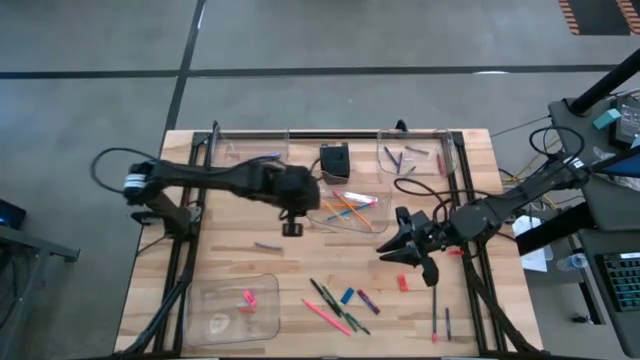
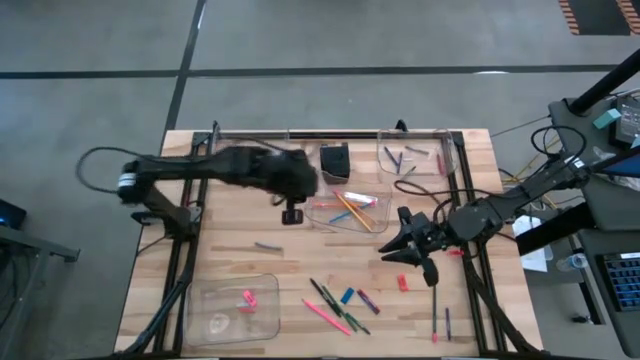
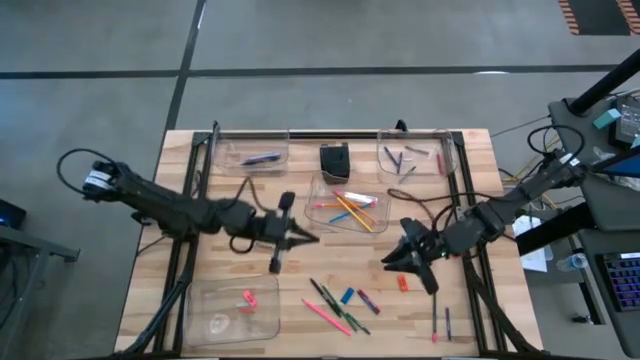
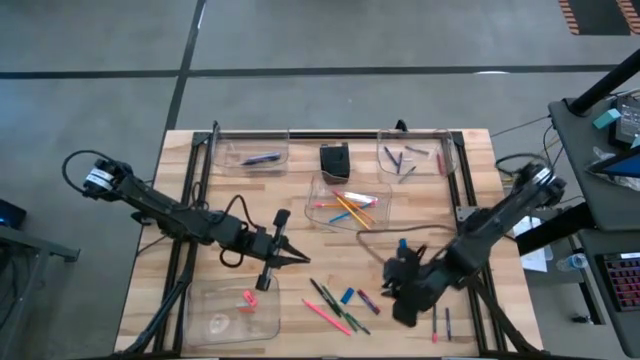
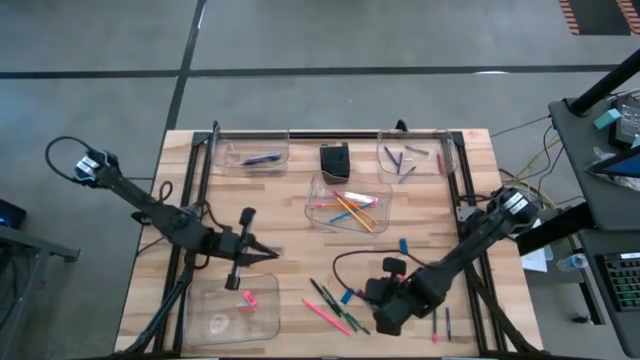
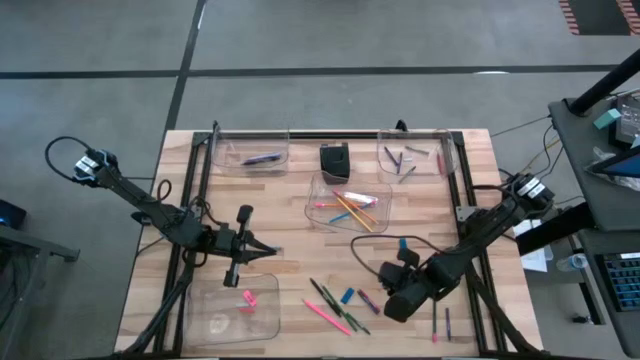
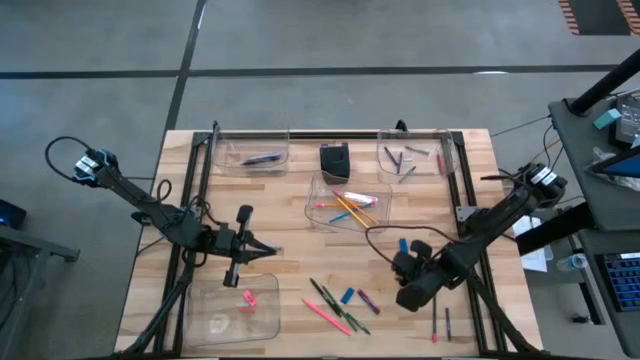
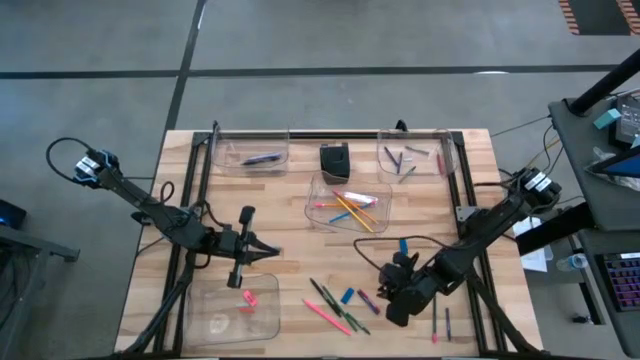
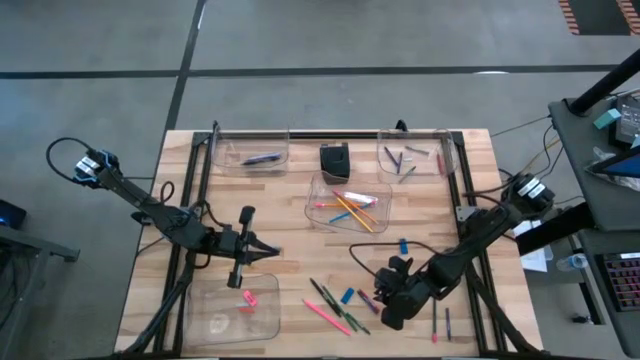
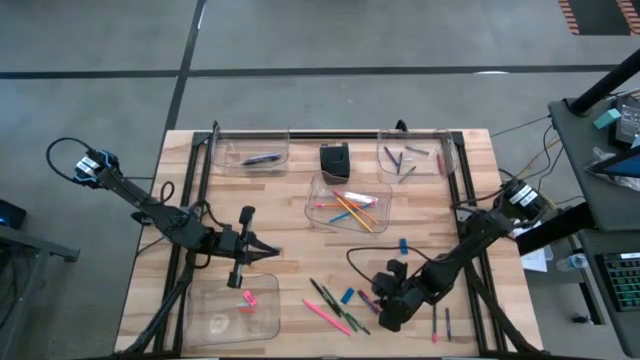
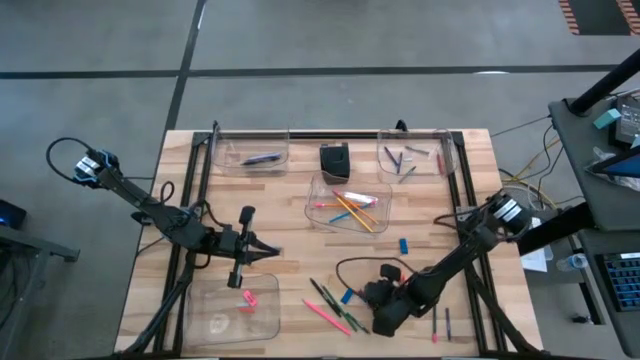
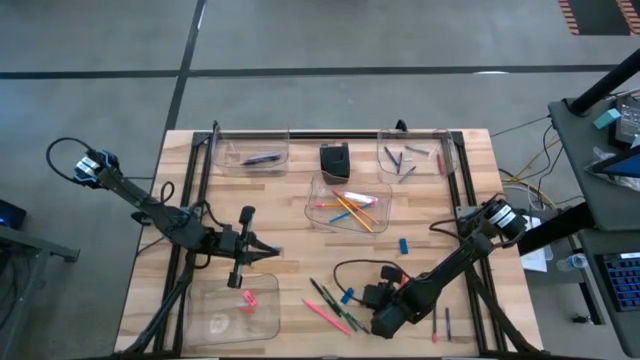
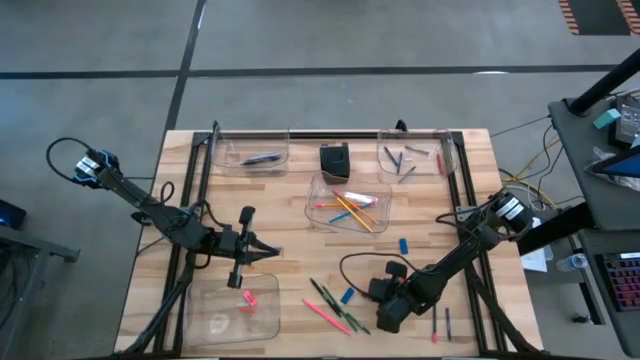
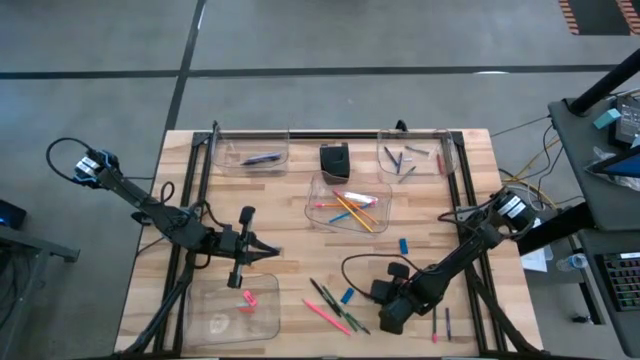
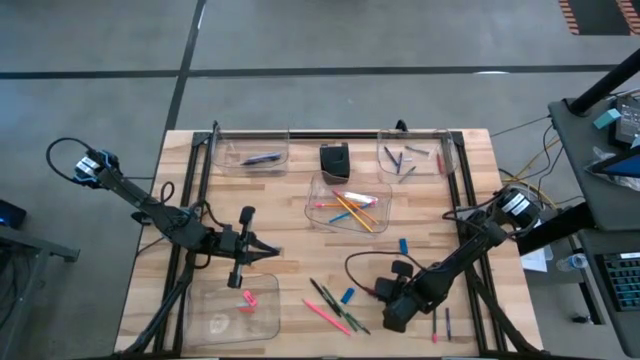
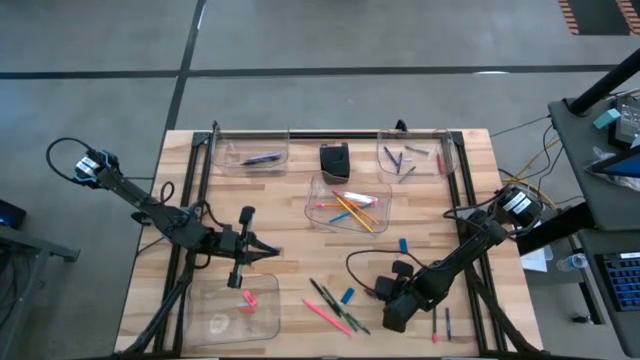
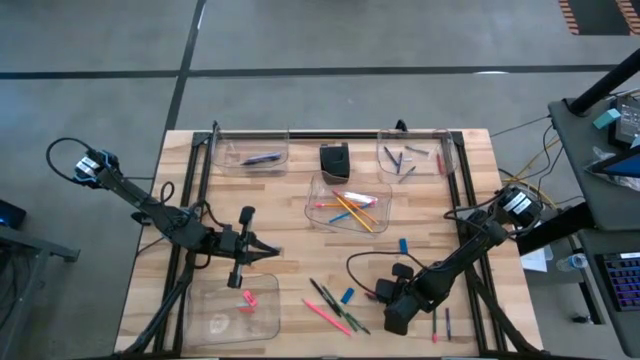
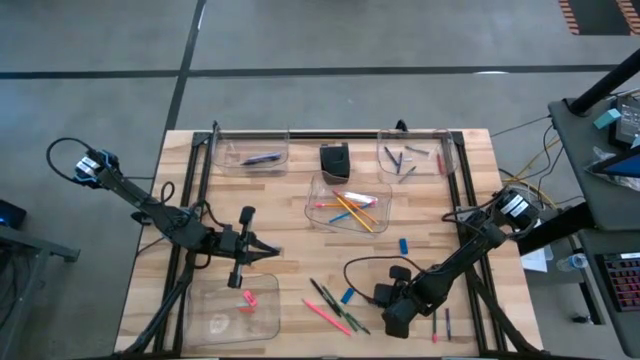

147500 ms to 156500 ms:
Task: Sort crayons/erasers/pens/pencils in bins
Put the blue crayon into the top right transparent bin

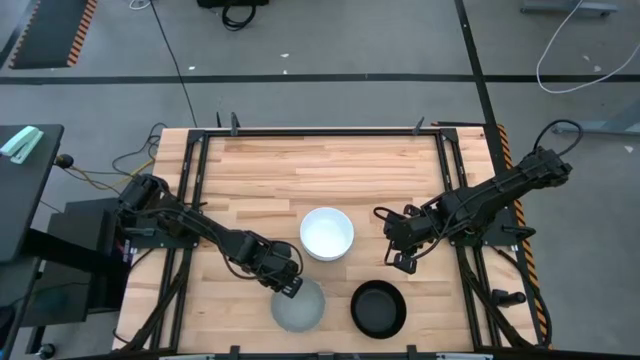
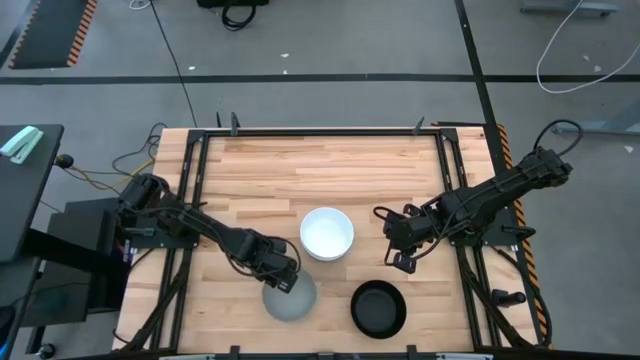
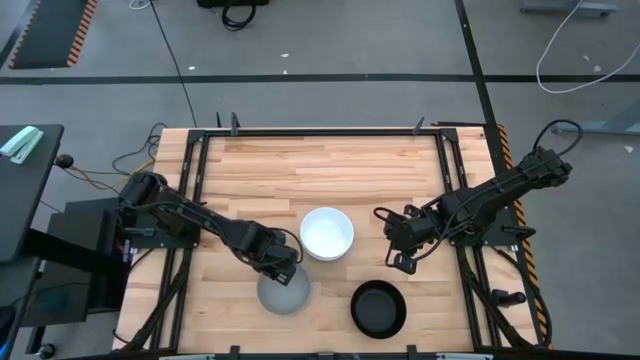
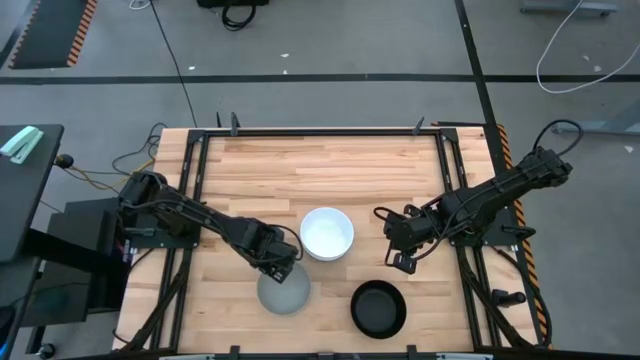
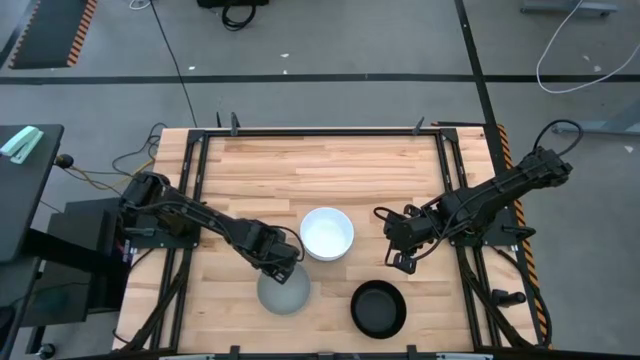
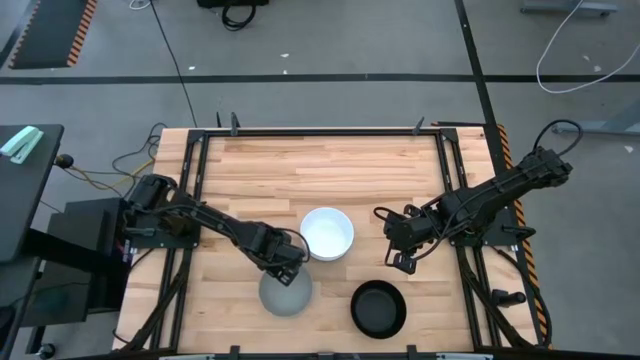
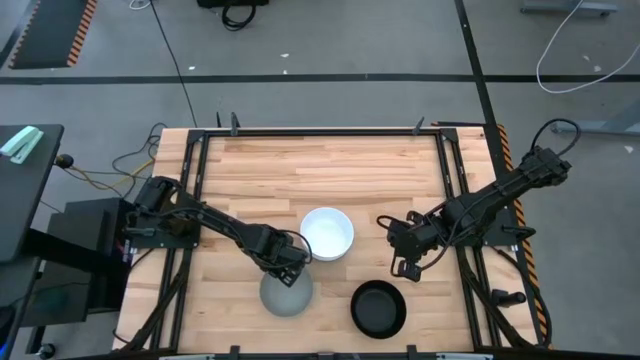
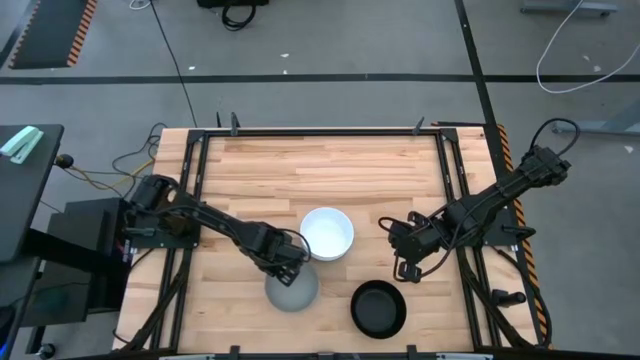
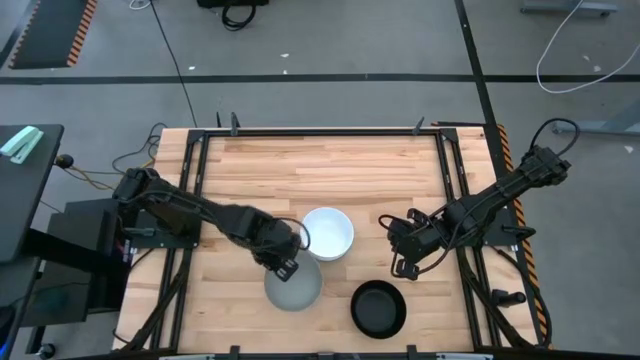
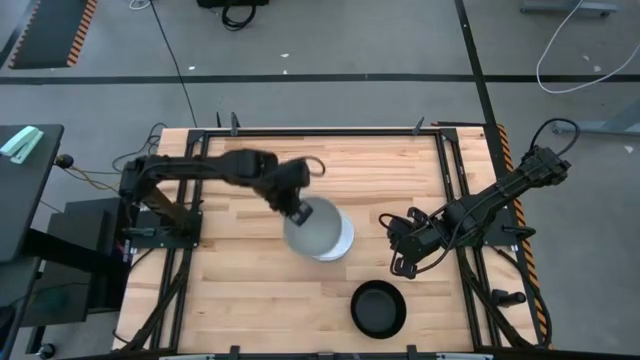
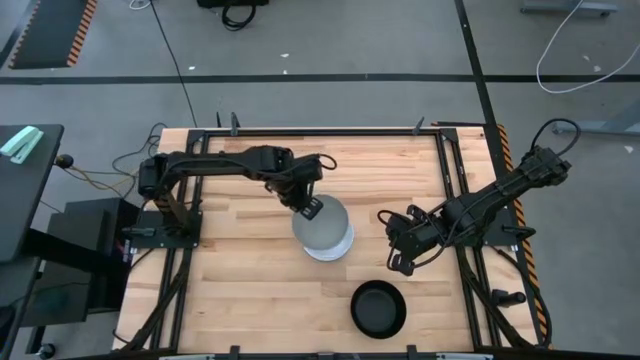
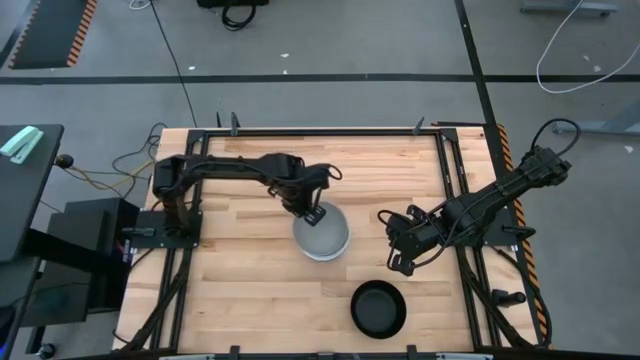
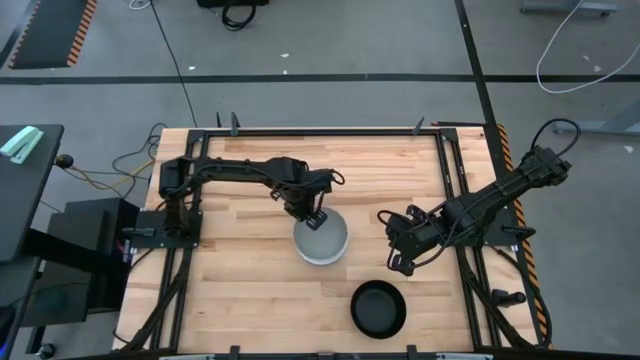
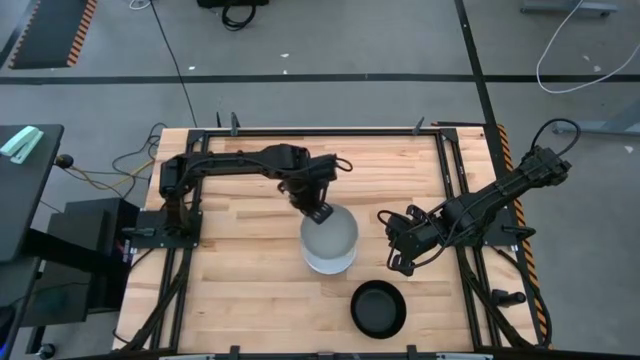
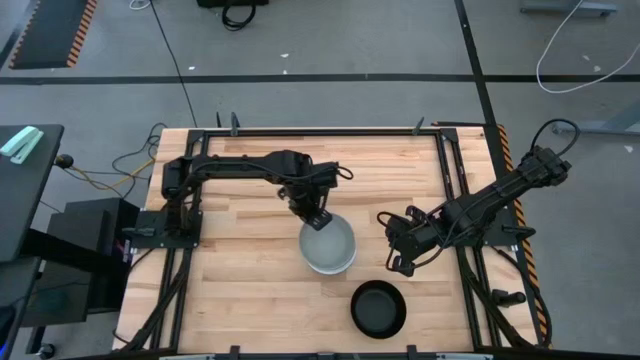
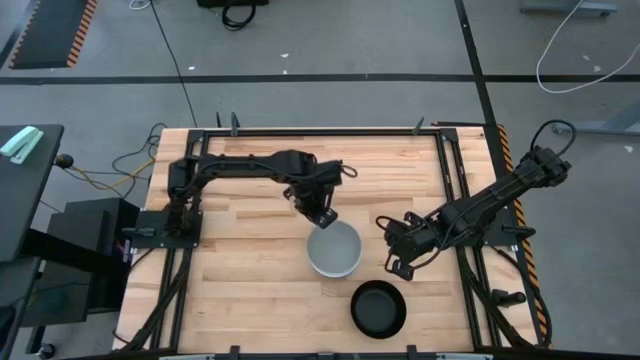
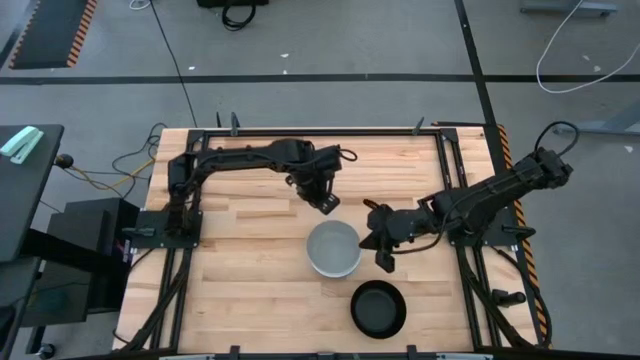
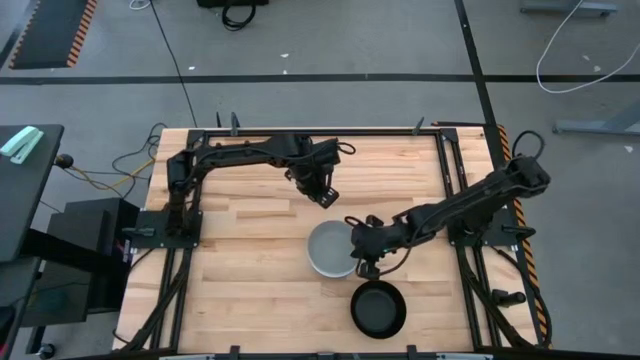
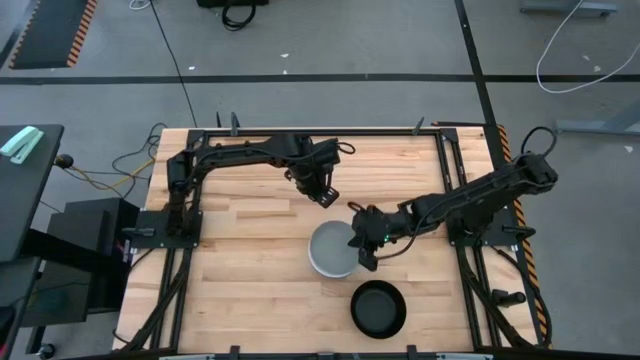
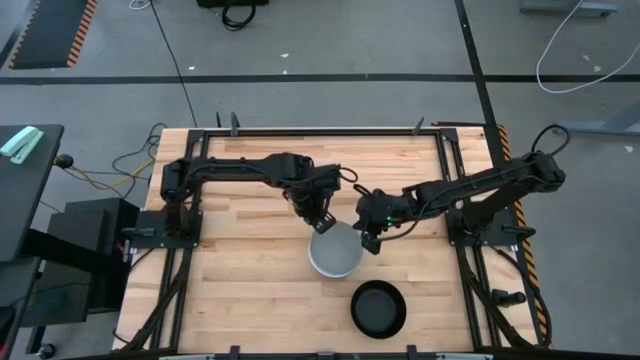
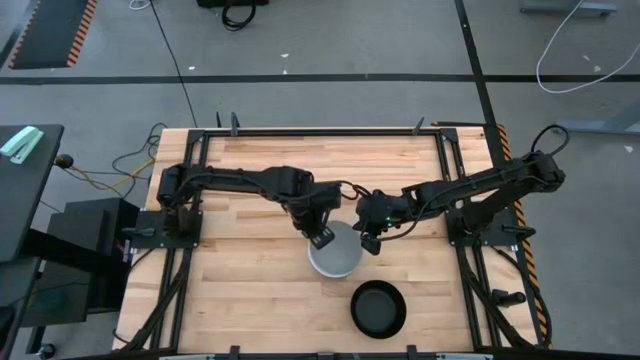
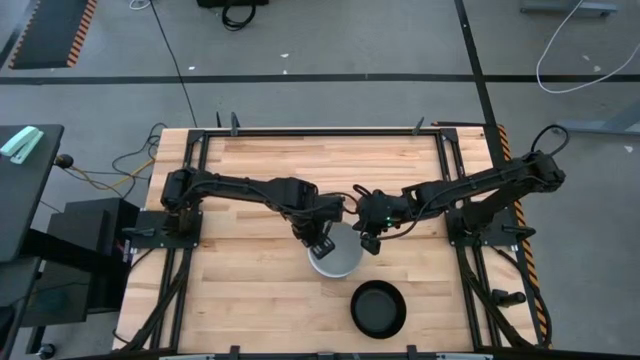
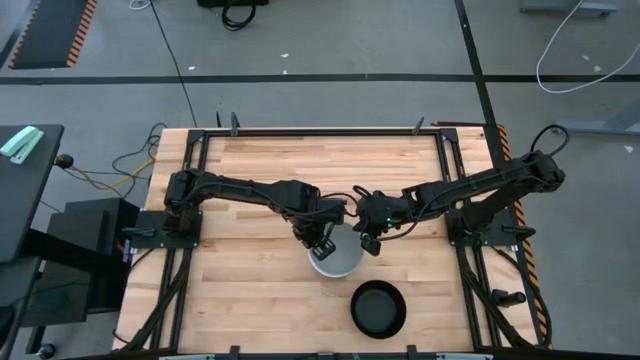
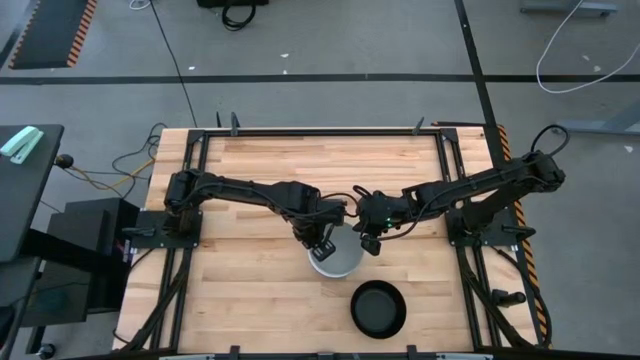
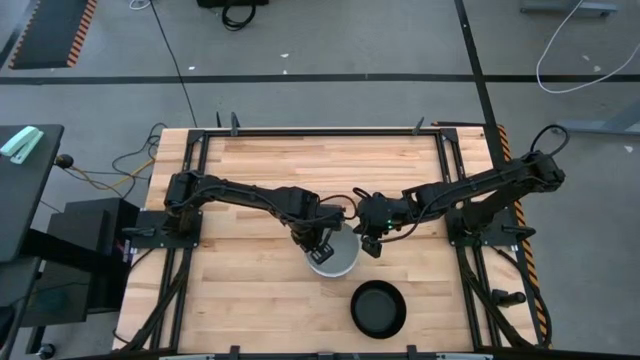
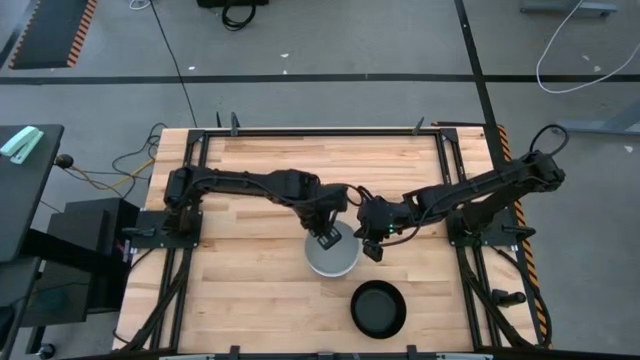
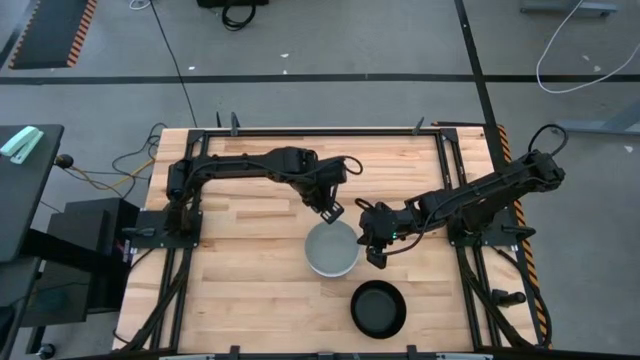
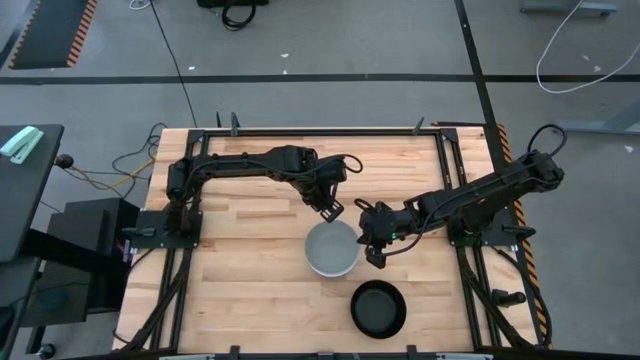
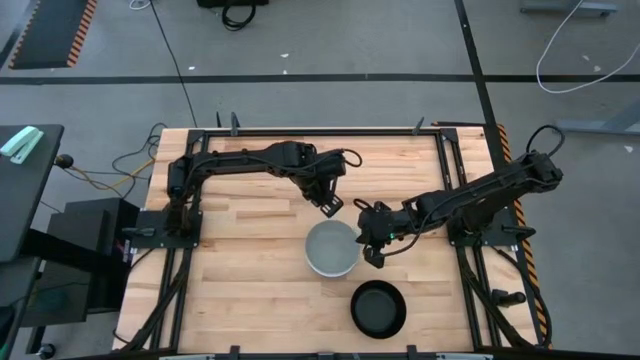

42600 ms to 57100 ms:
Task: Nest bowls inside each other
Stack the gray bowl on the white bowl
